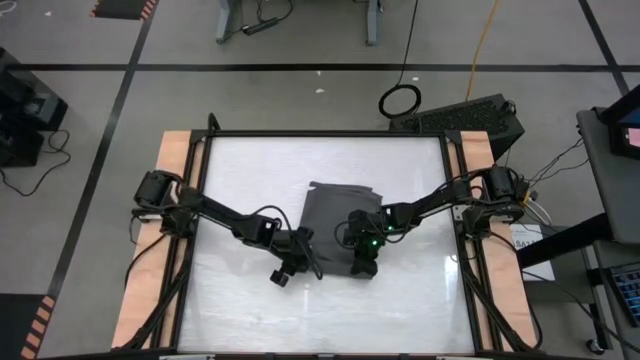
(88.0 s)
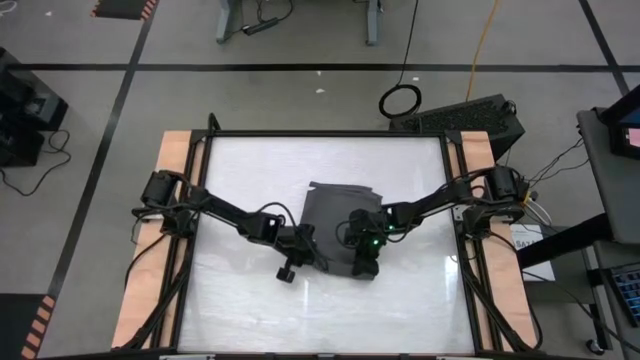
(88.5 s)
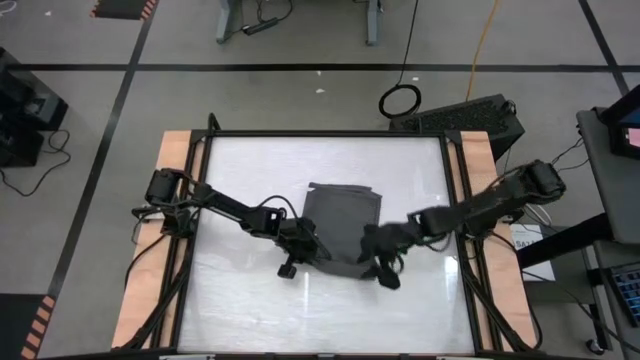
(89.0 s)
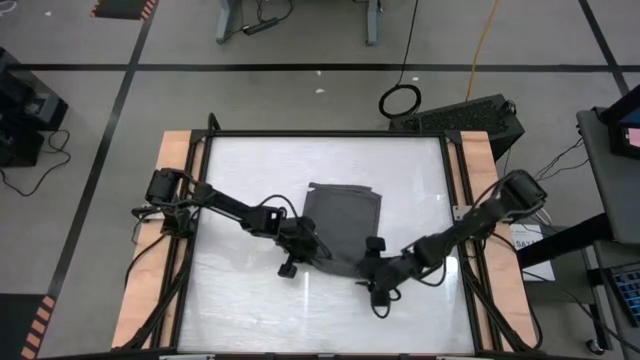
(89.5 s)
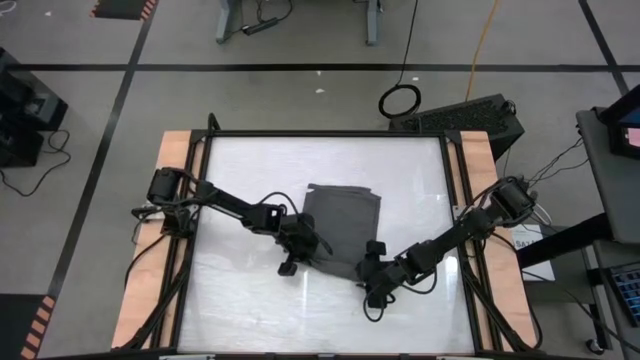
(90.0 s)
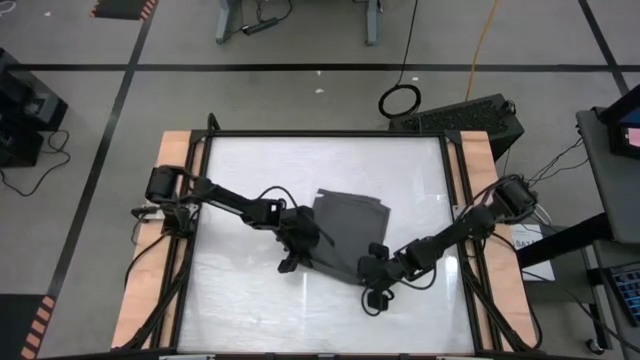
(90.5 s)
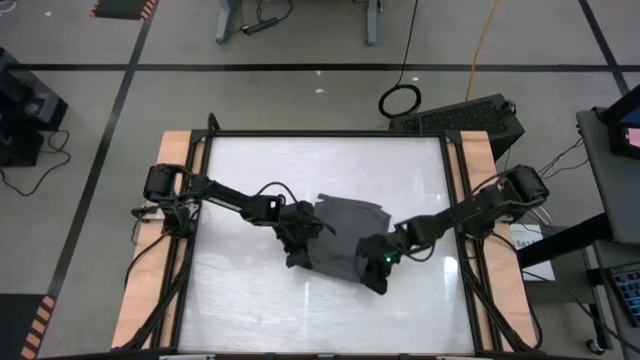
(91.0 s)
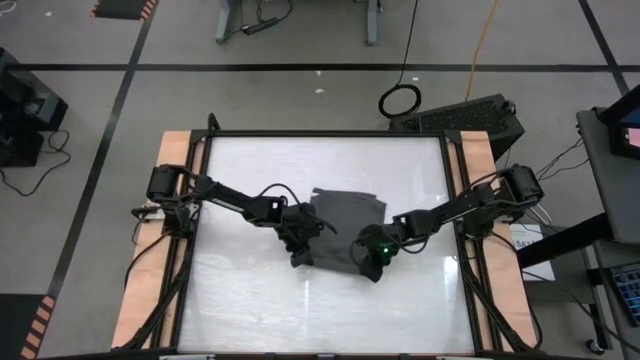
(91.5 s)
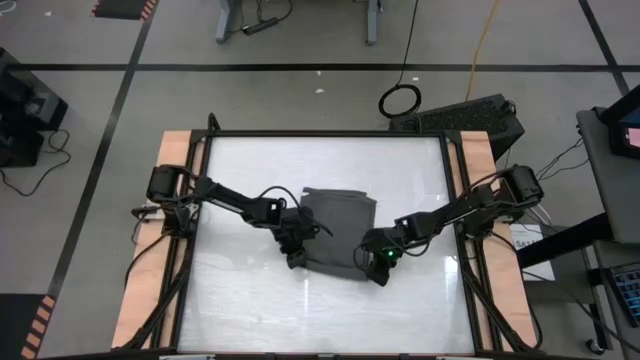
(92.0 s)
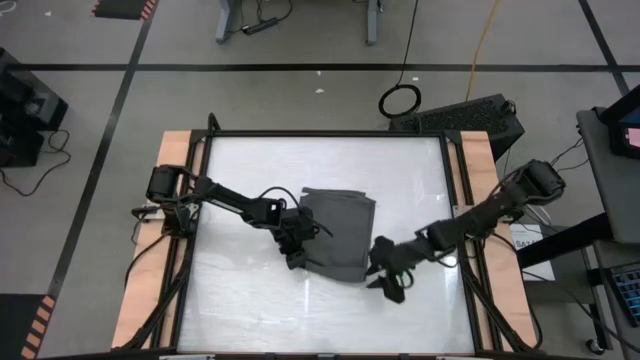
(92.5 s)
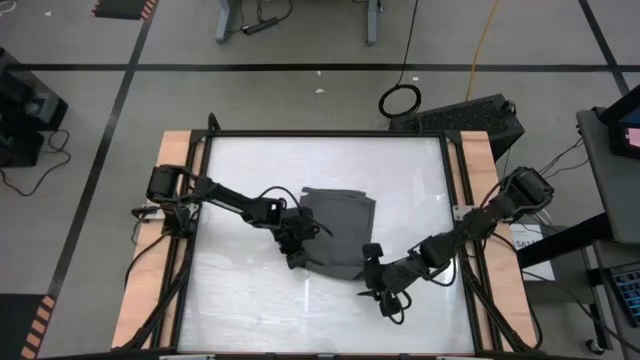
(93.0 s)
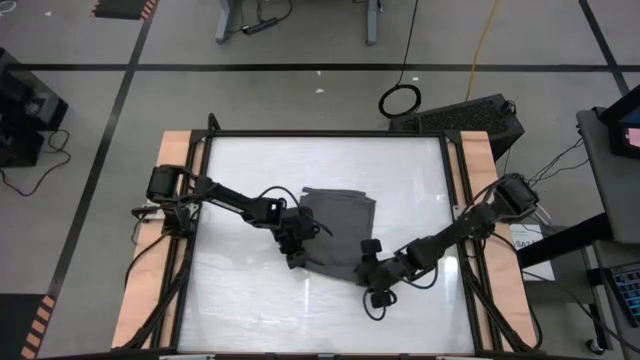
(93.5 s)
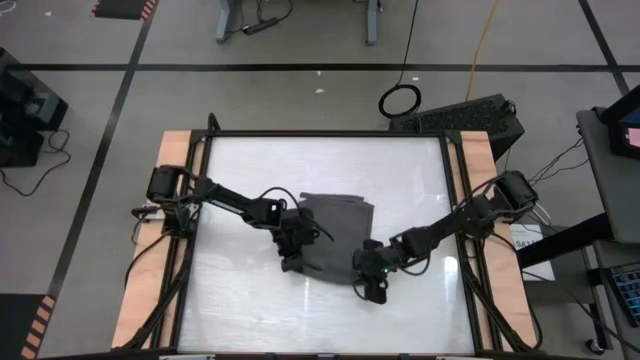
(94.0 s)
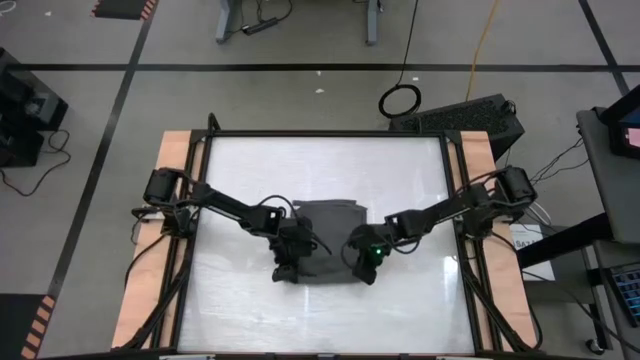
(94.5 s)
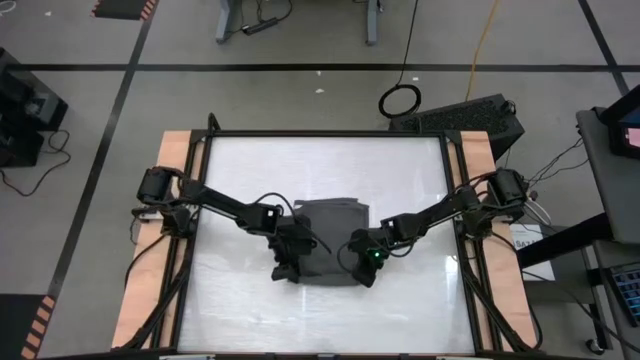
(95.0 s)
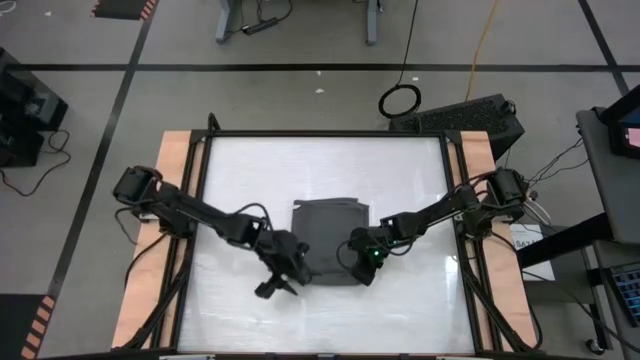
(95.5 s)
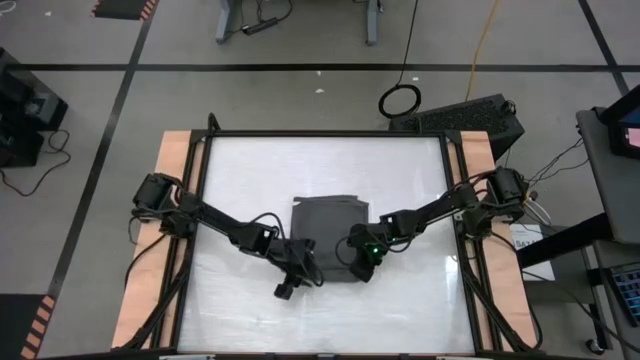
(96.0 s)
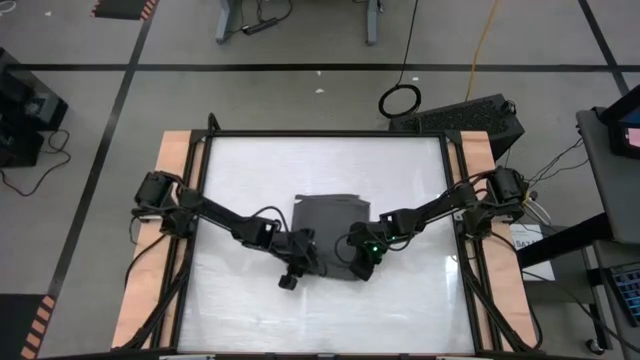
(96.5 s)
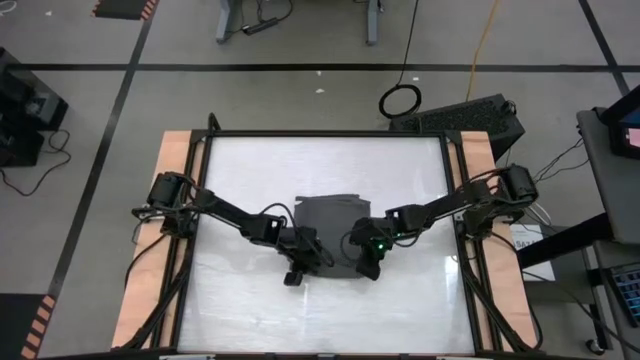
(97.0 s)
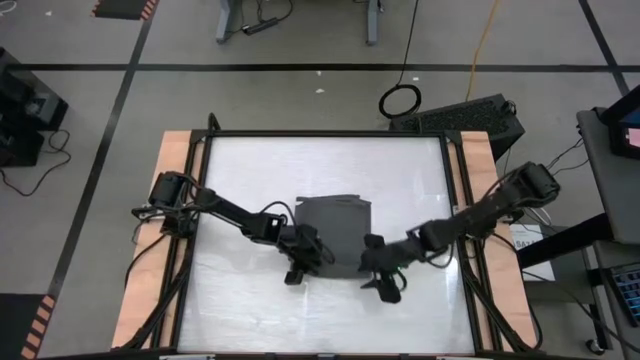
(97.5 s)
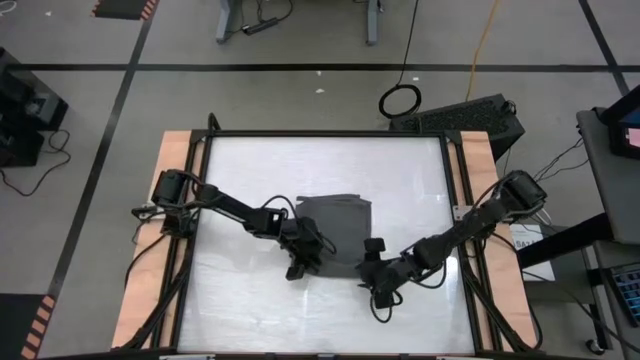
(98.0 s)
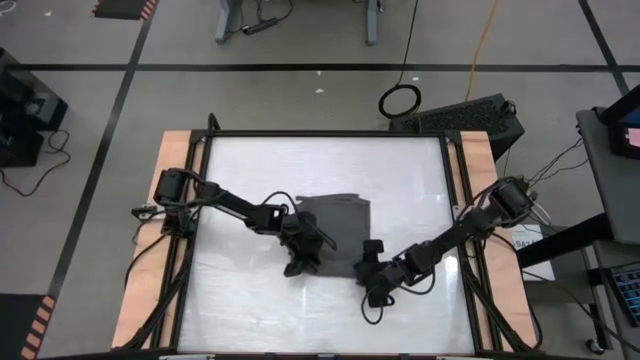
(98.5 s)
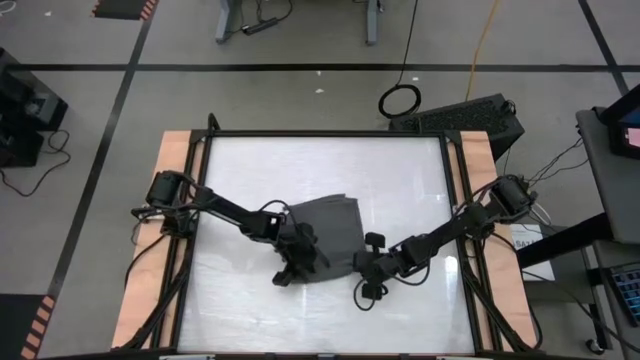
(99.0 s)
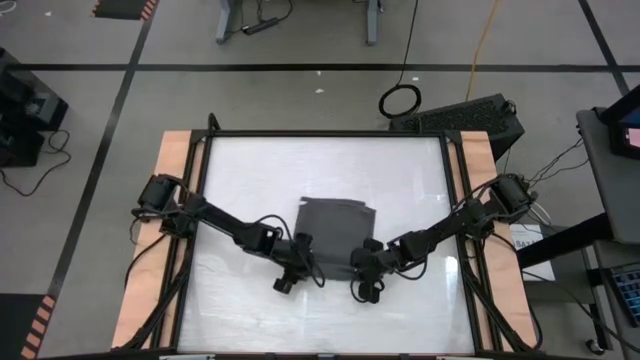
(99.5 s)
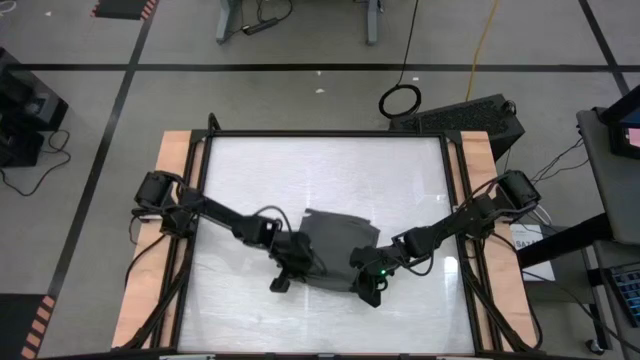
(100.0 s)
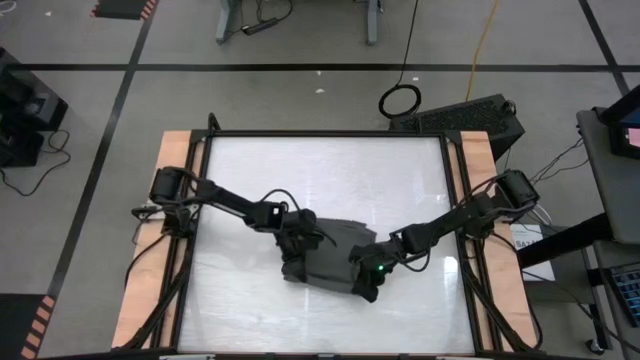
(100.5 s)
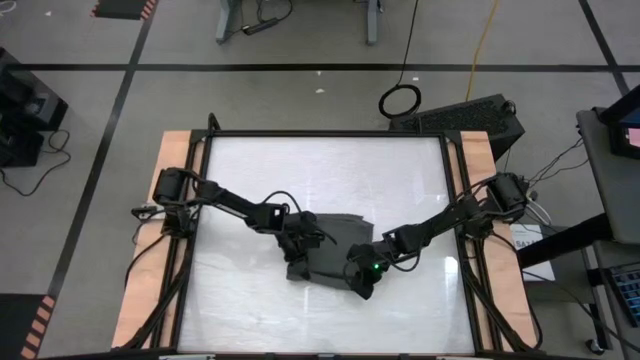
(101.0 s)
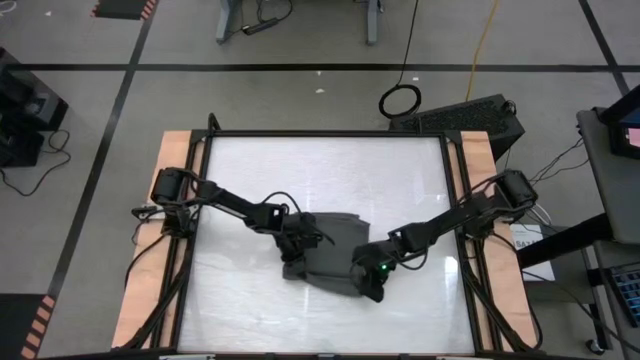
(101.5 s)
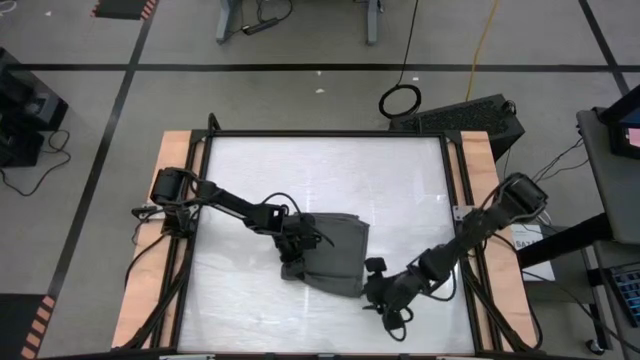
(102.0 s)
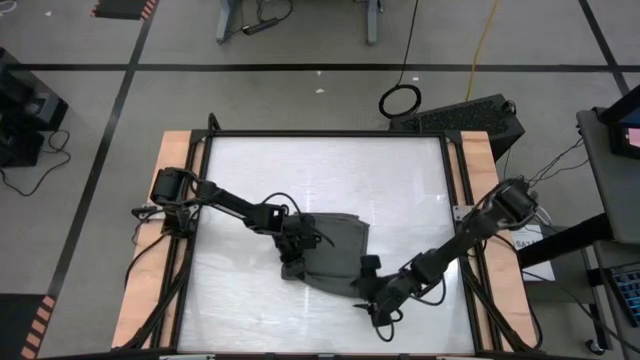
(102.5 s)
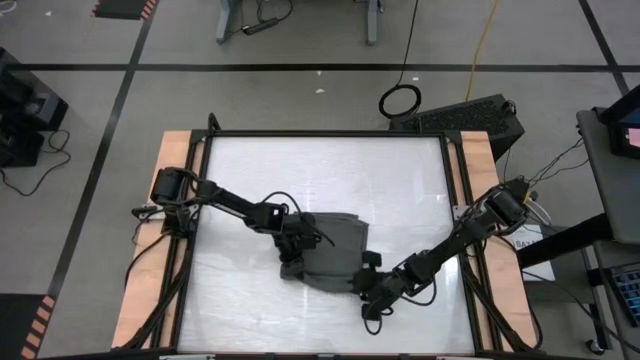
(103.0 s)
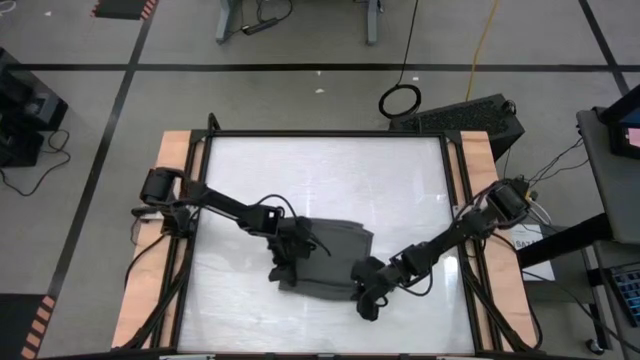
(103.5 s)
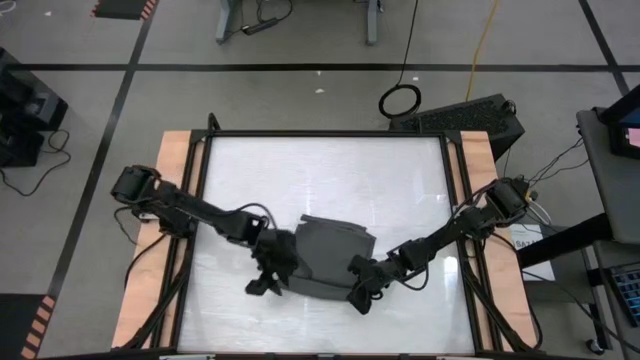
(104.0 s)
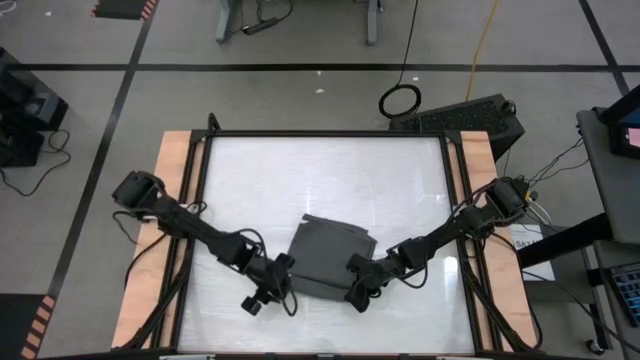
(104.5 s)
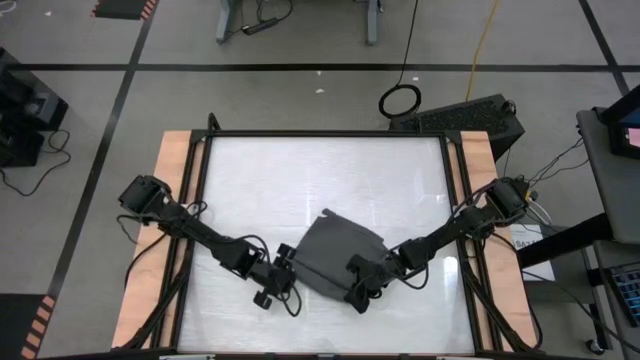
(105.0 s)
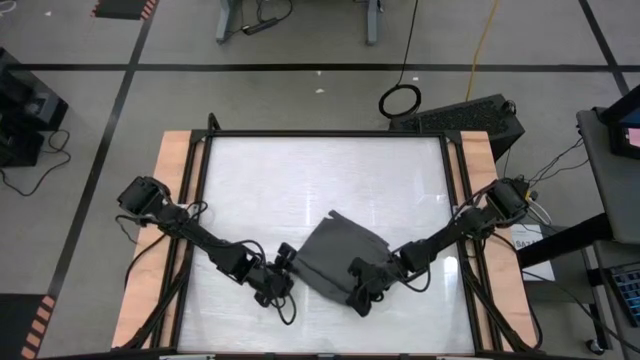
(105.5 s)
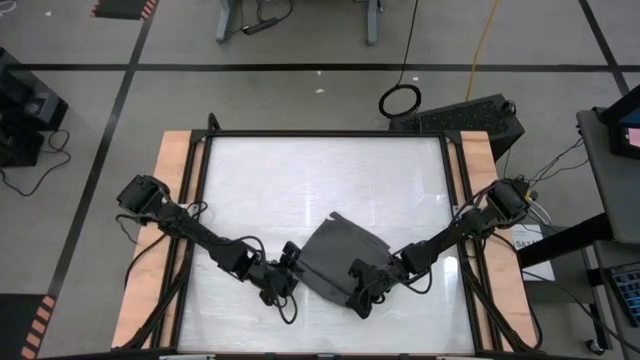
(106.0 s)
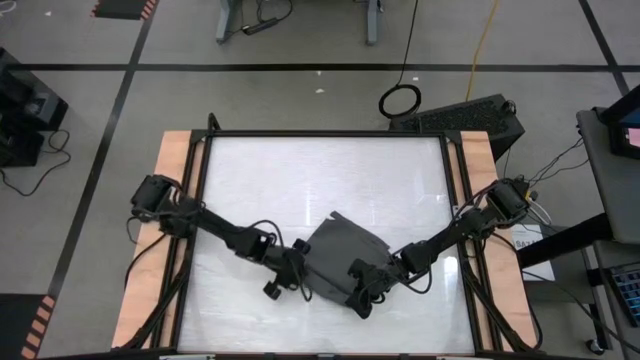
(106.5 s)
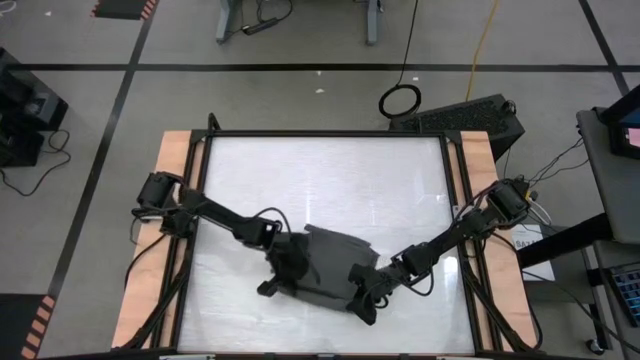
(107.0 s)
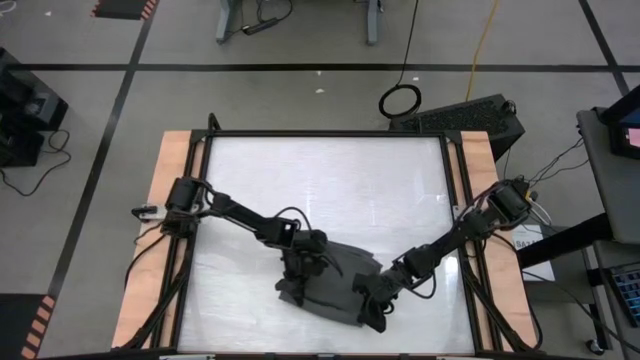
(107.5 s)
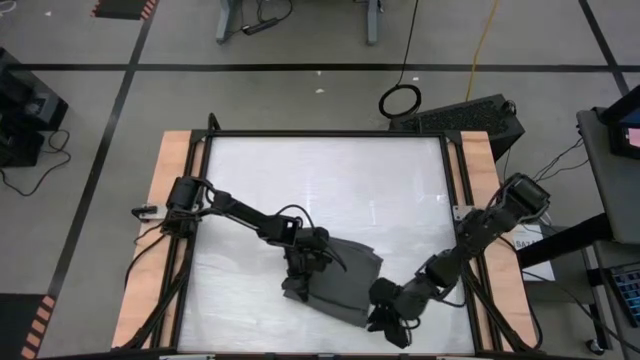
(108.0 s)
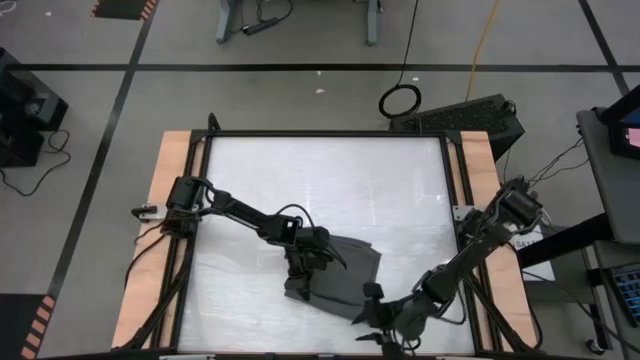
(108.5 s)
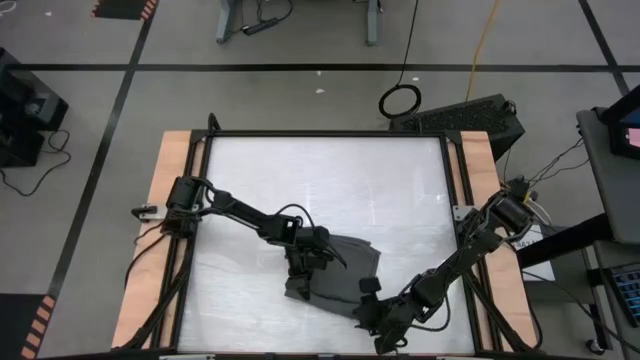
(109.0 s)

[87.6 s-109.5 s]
Task: Roll towel
Roll the dark gray towel
